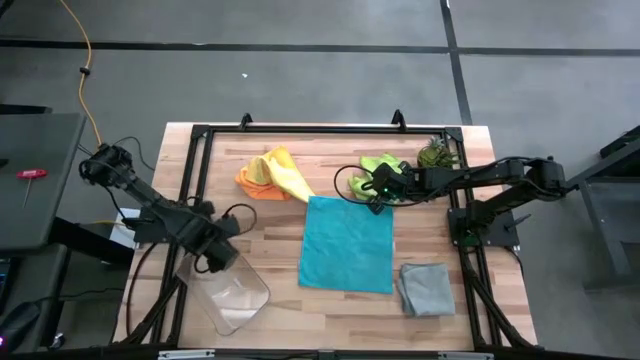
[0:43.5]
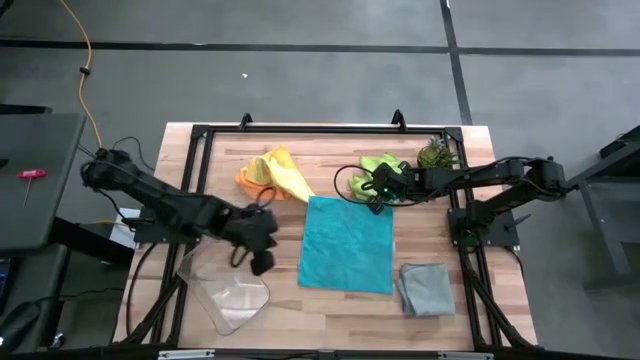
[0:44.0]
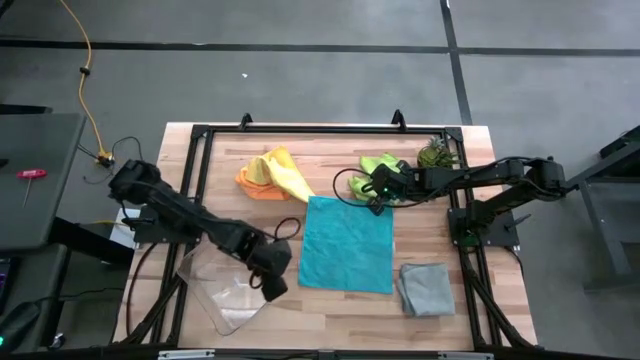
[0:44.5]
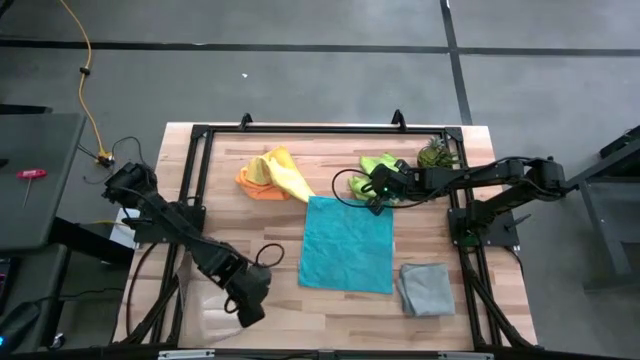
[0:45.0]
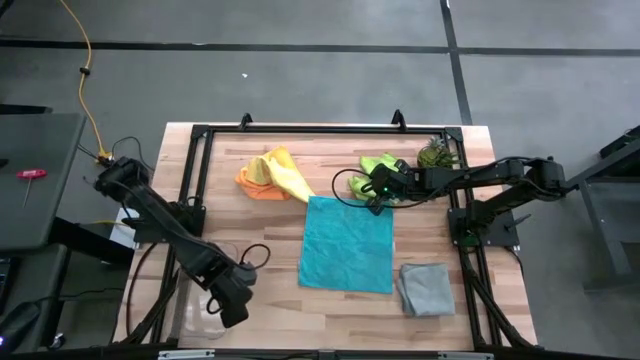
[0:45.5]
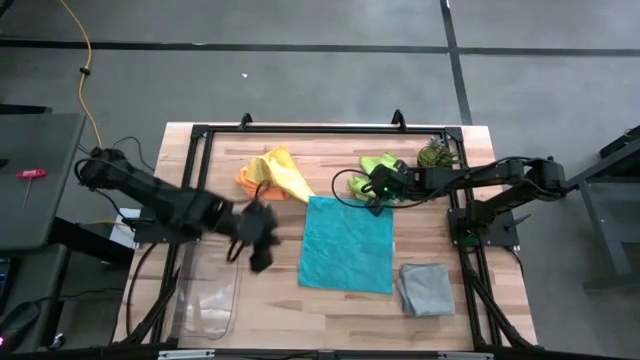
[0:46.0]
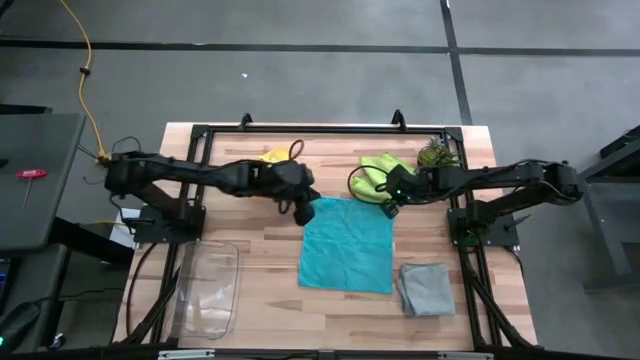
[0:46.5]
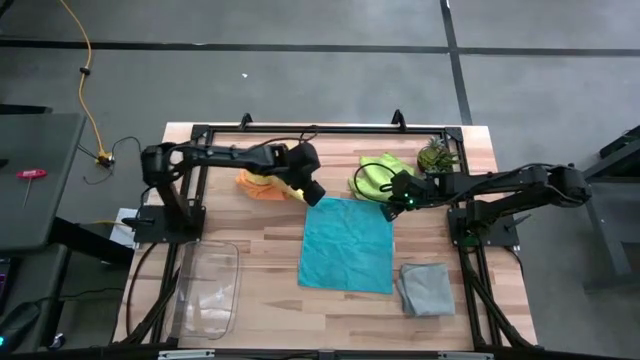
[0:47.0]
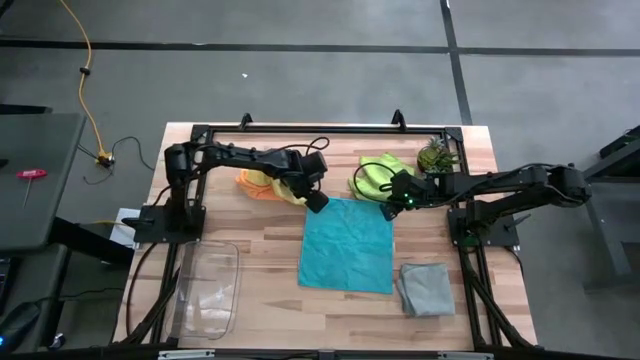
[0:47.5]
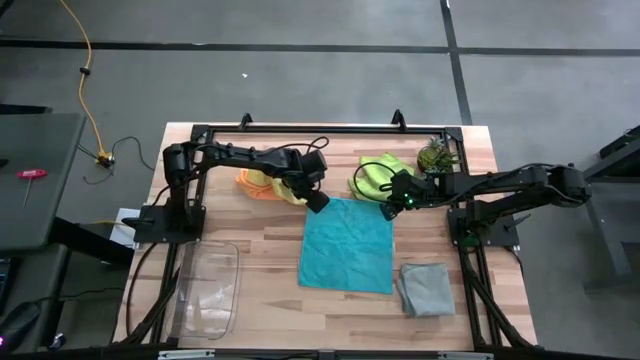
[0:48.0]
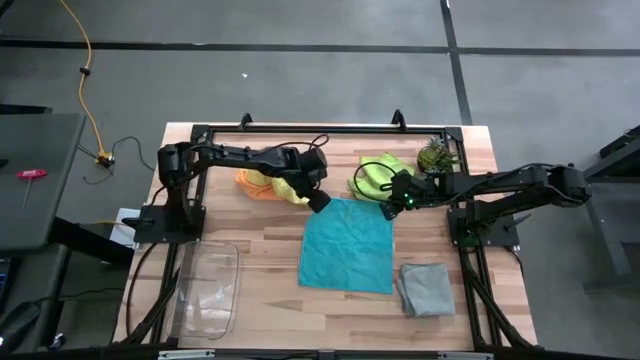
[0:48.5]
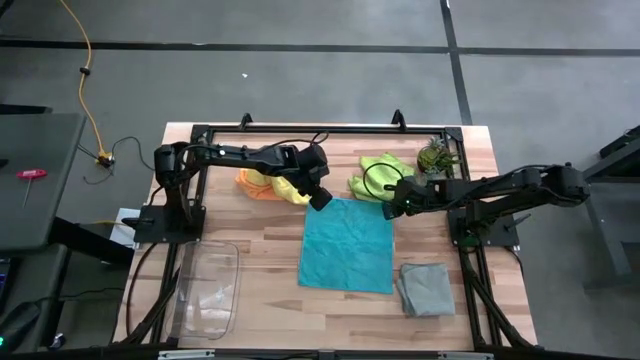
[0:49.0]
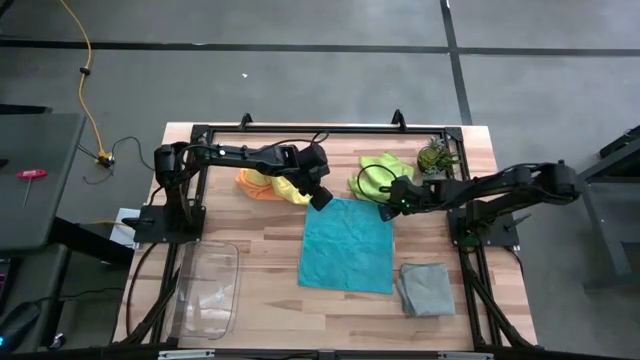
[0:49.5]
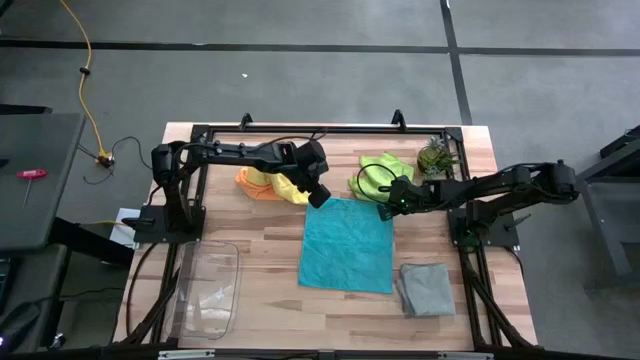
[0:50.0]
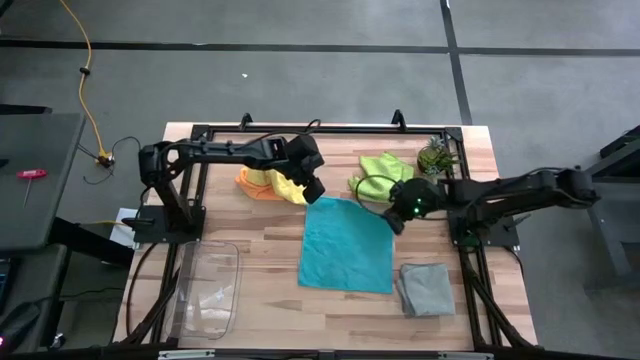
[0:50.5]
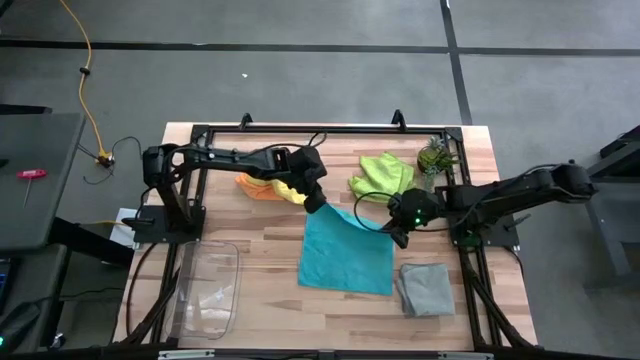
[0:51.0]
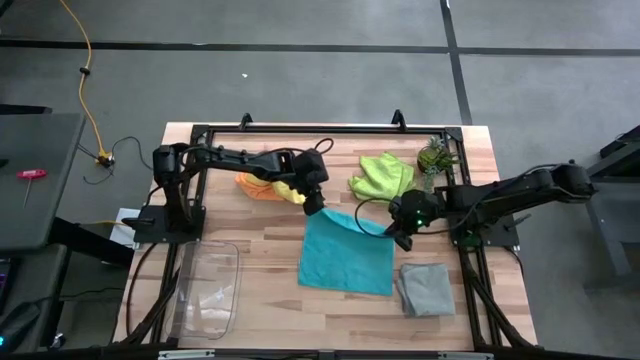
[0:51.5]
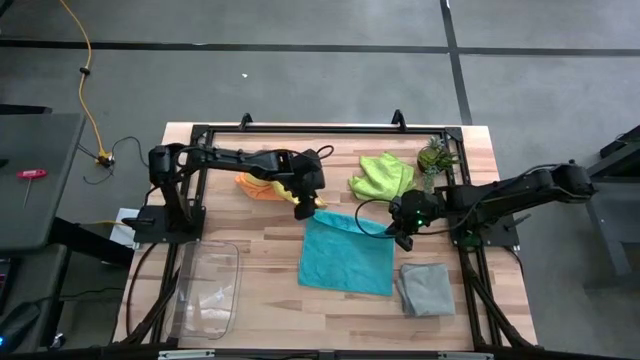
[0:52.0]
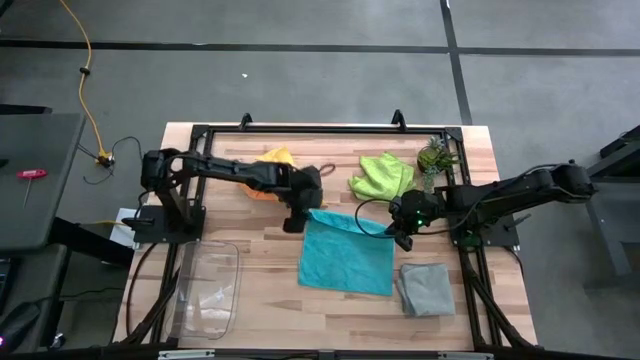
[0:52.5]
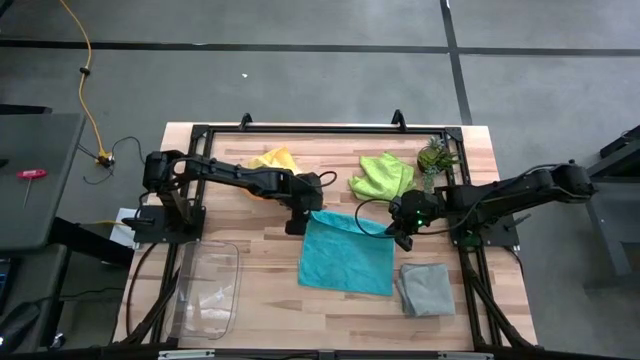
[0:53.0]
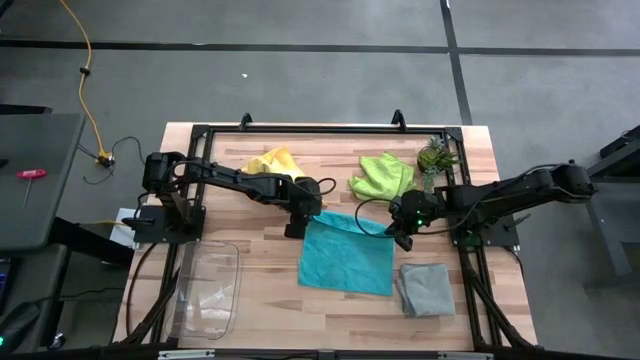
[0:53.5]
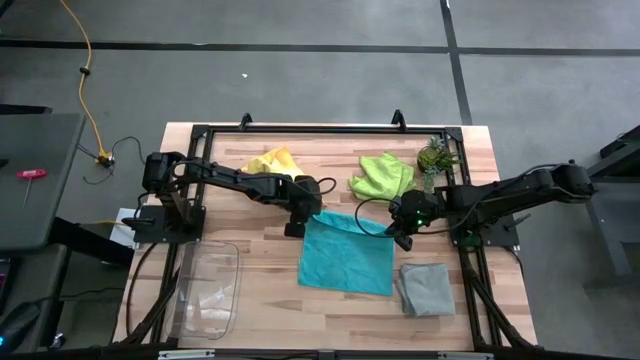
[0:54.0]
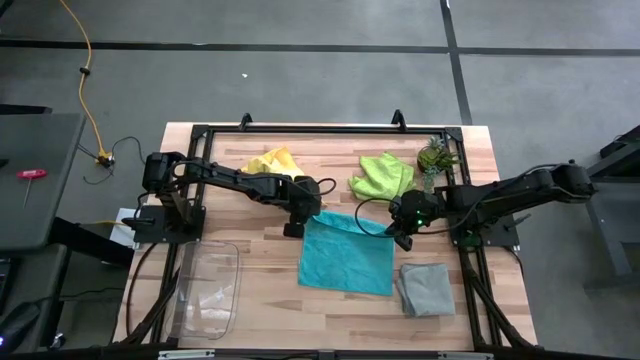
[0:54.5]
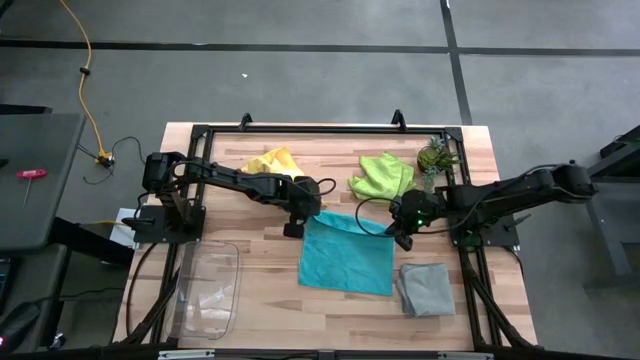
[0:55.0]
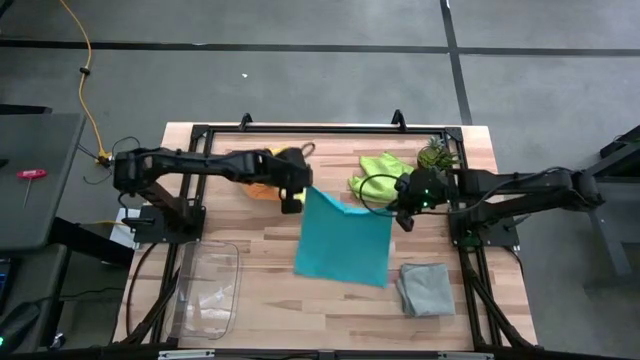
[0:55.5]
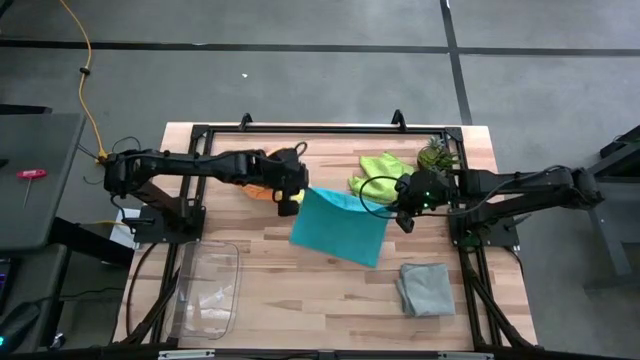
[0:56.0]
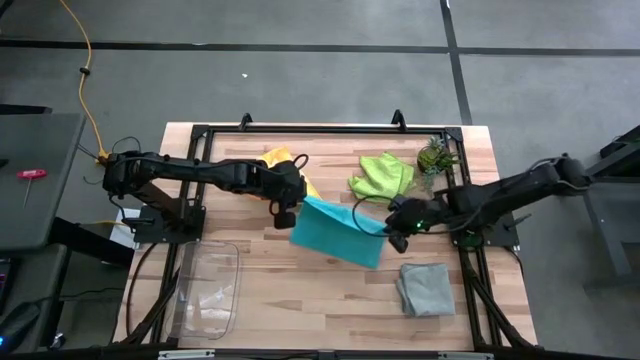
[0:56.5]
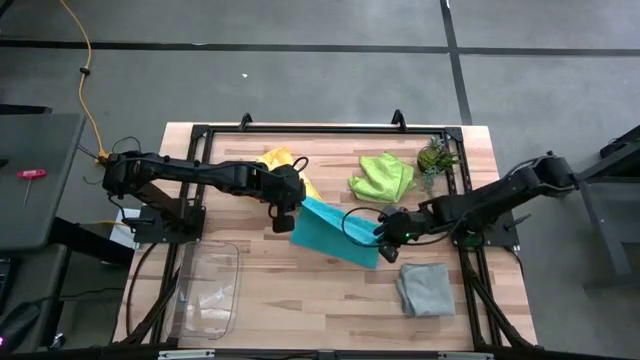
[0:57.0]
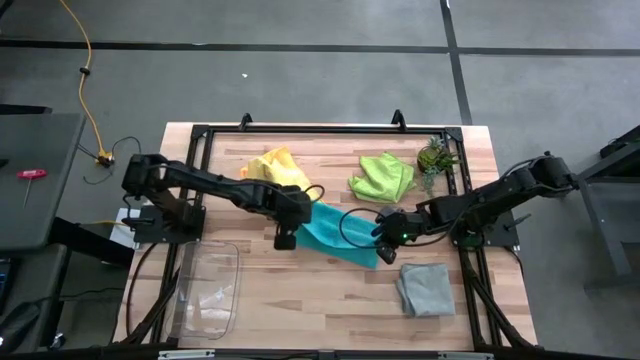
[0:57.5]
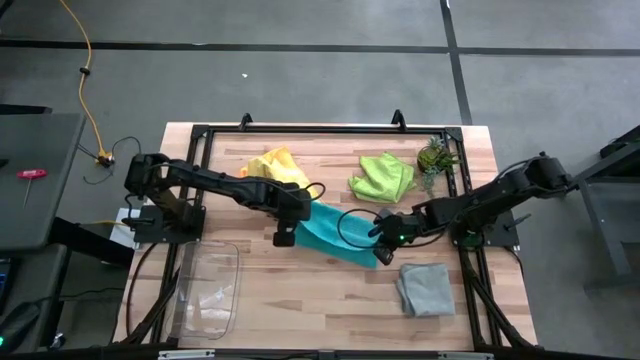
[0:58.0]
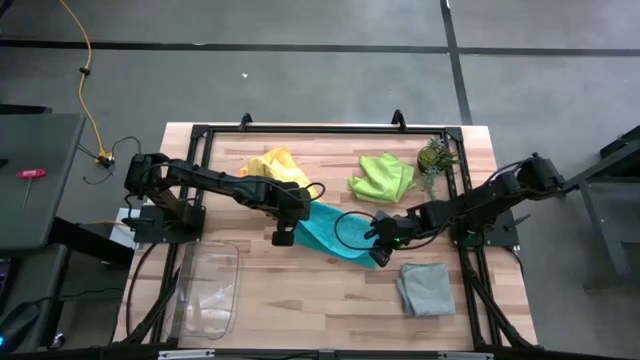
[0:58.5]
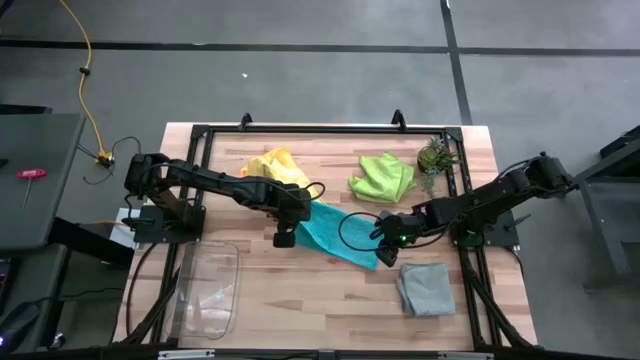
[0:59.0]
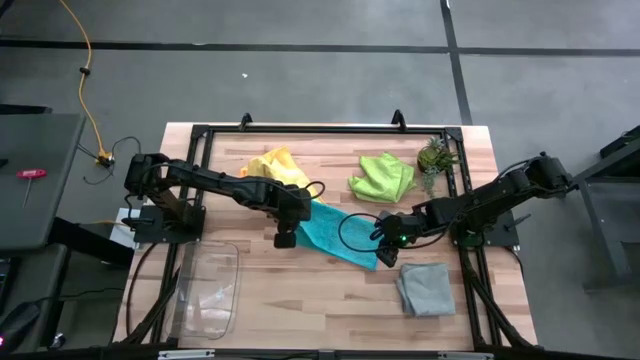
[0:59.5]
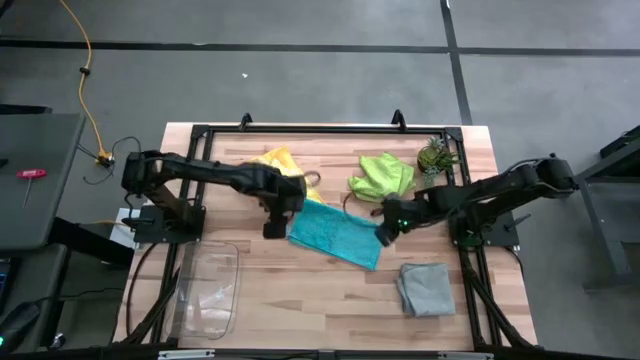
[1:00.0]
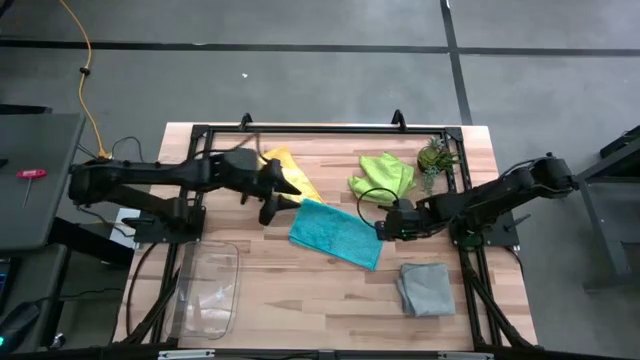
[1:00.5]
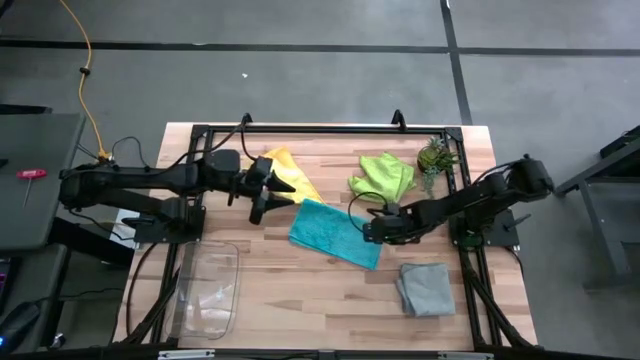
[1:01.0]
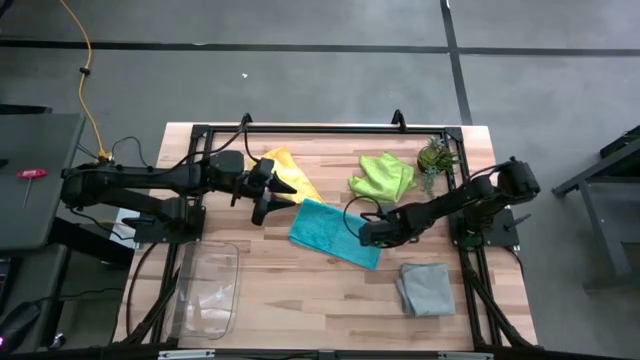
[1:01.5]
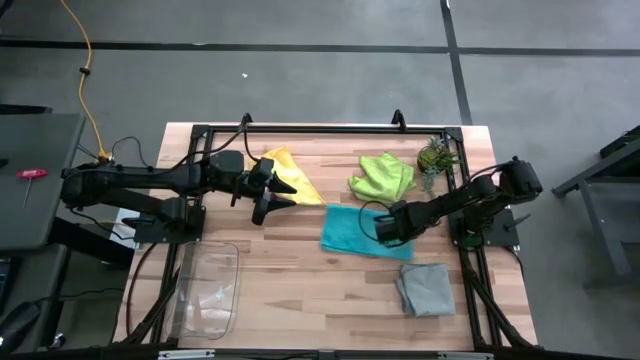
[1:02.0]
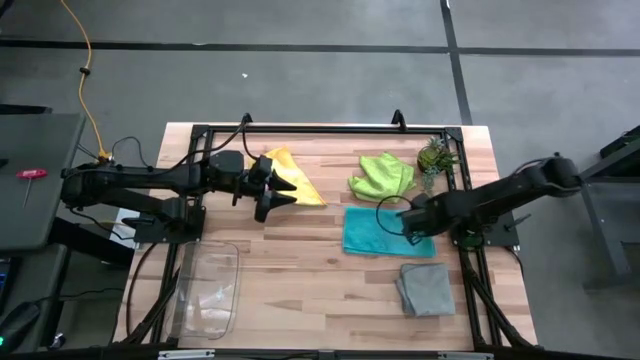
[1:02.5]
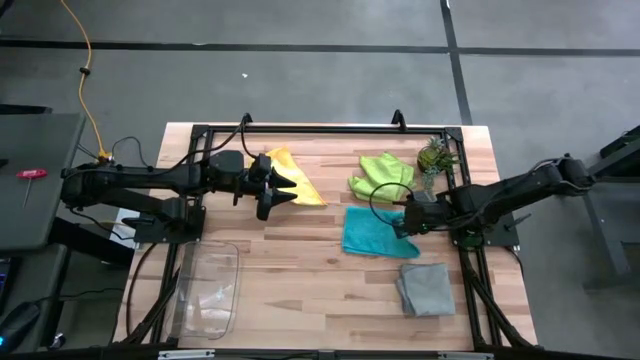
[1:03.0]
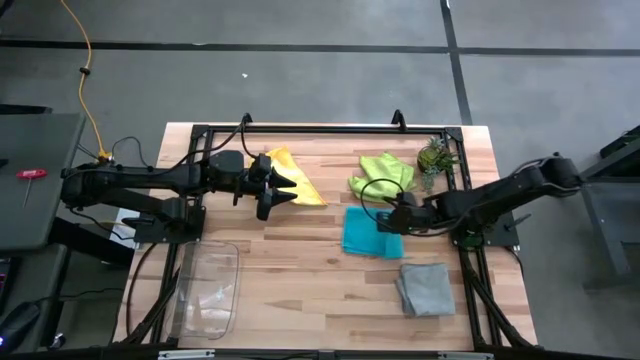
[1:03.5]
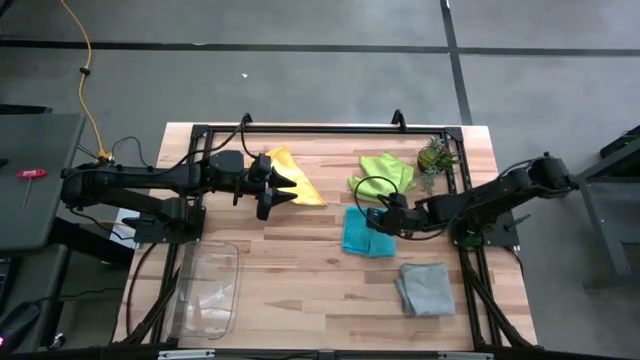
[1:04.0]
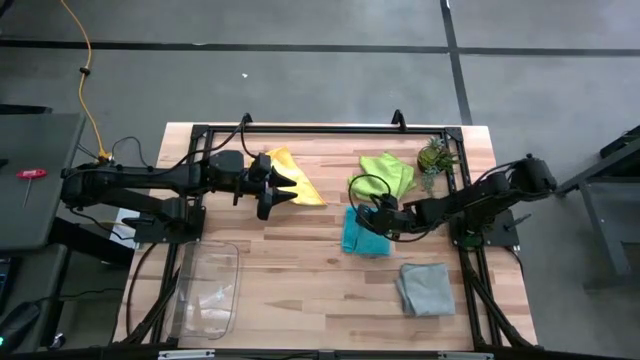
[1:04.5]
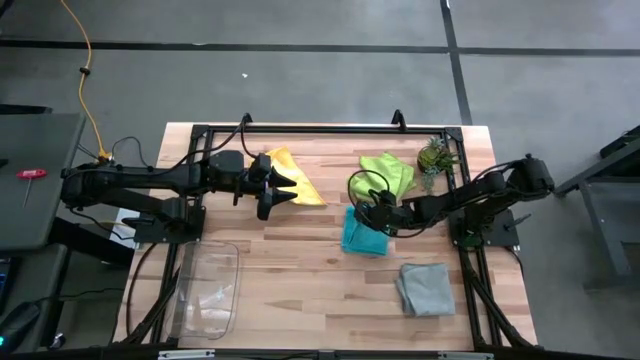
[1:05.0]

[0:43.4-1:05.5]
Task: Fold microfiber towels
Fold the blue microfiber cloth
